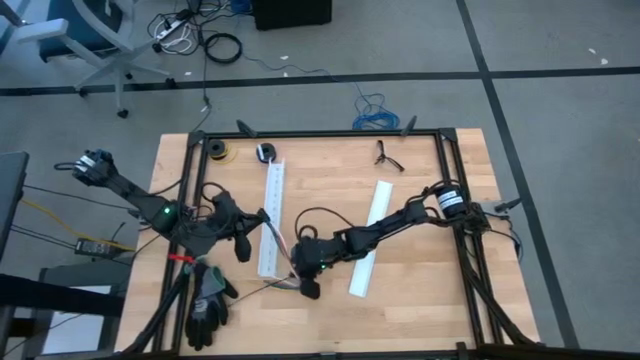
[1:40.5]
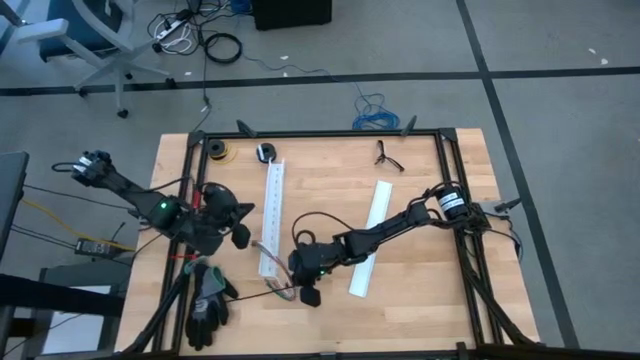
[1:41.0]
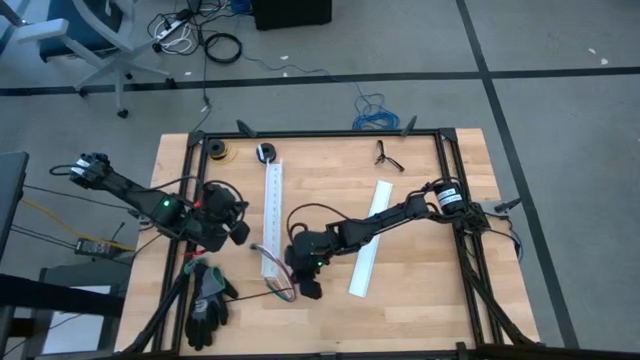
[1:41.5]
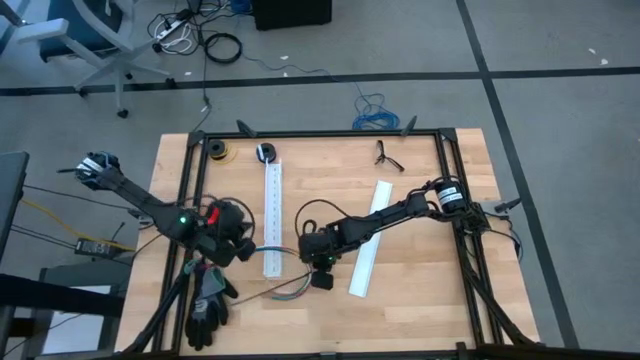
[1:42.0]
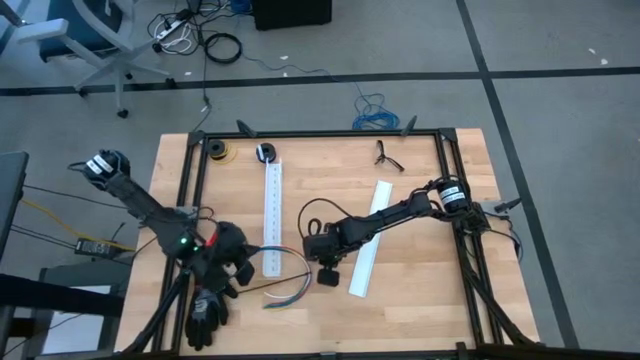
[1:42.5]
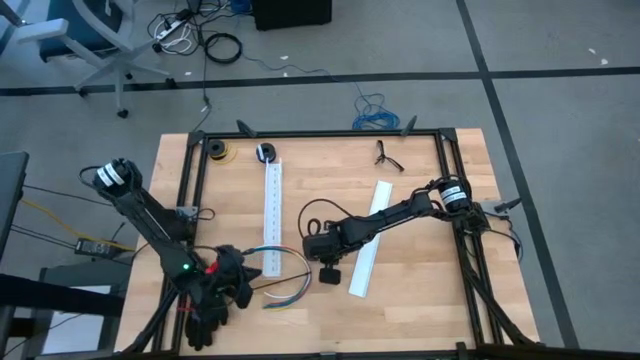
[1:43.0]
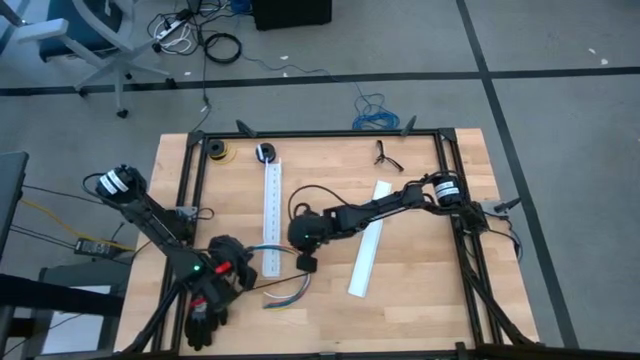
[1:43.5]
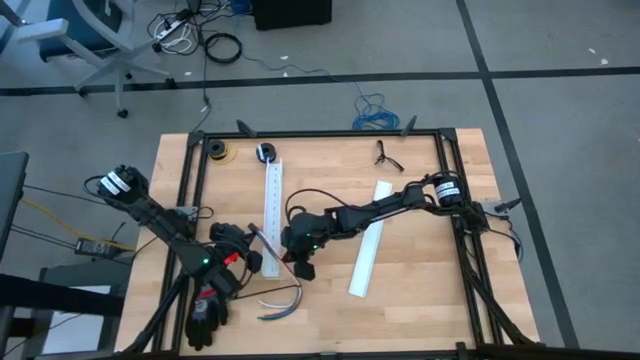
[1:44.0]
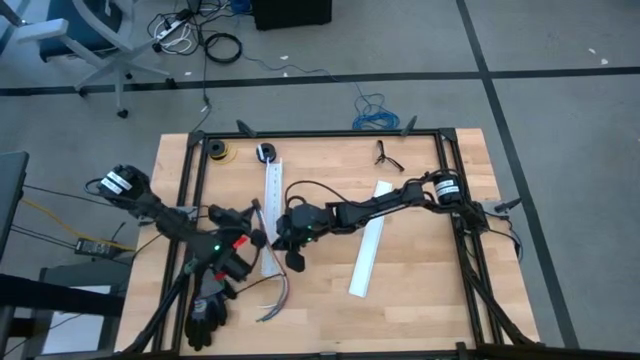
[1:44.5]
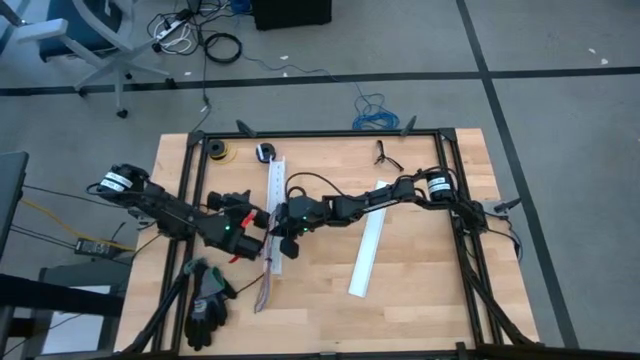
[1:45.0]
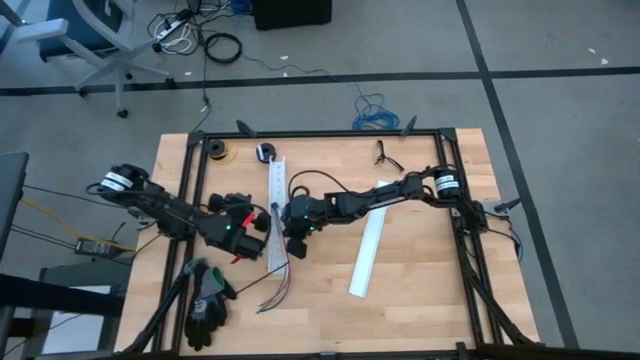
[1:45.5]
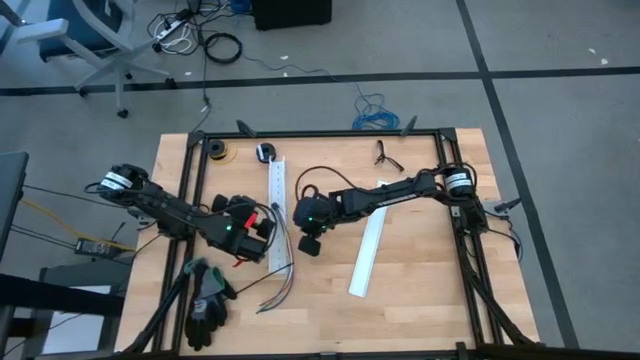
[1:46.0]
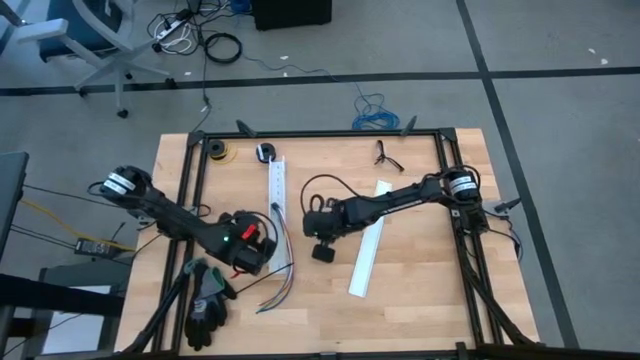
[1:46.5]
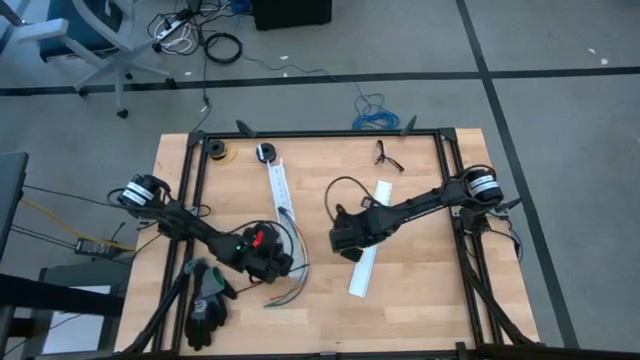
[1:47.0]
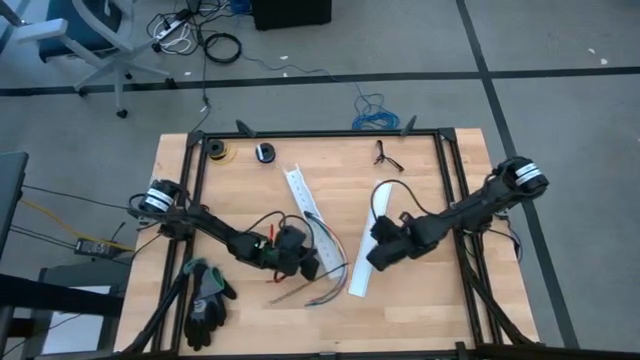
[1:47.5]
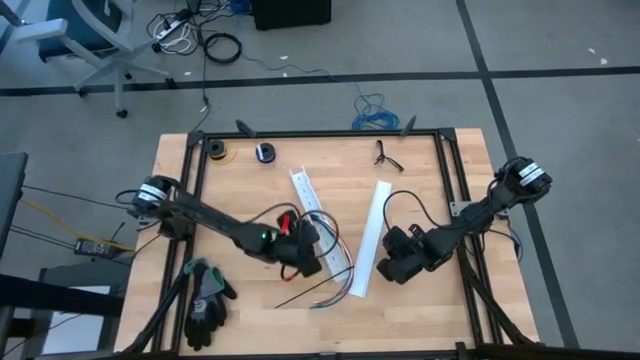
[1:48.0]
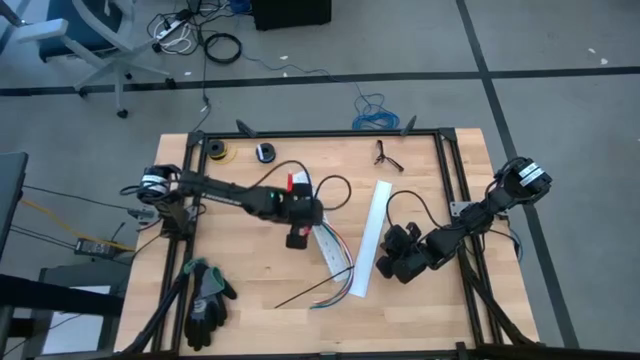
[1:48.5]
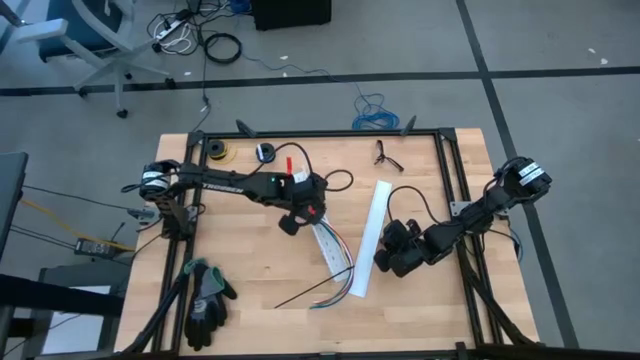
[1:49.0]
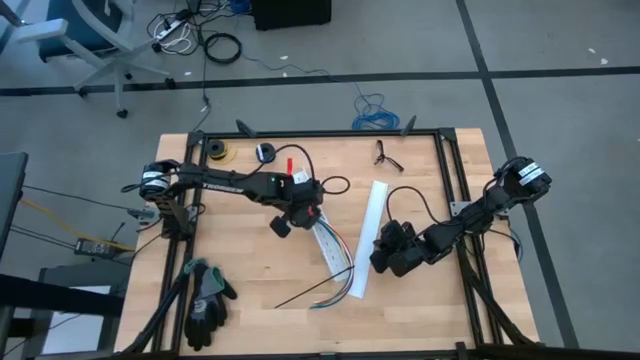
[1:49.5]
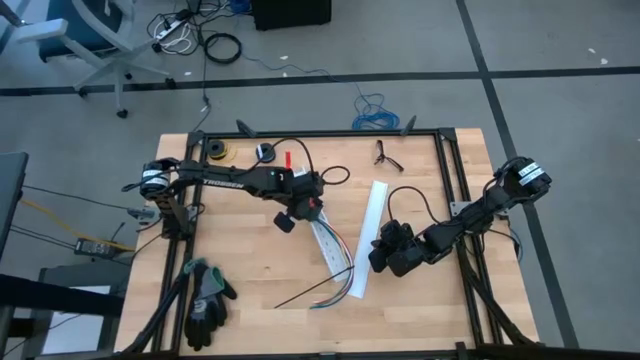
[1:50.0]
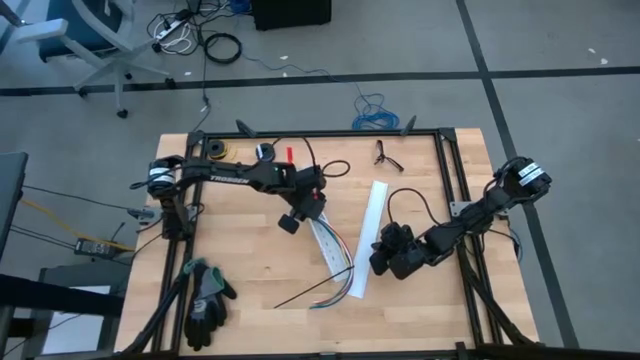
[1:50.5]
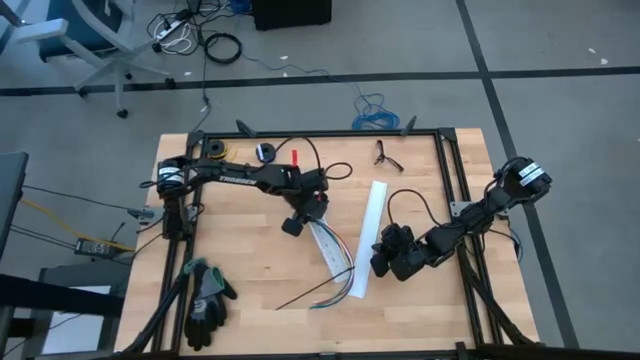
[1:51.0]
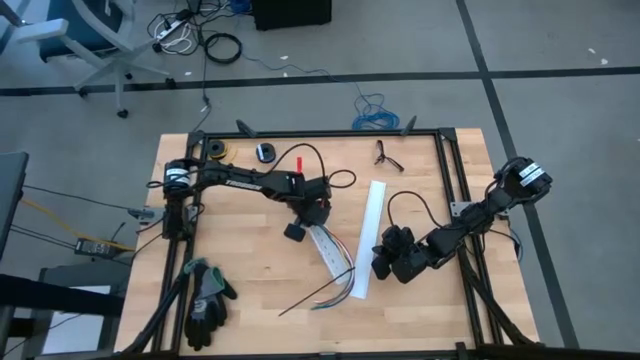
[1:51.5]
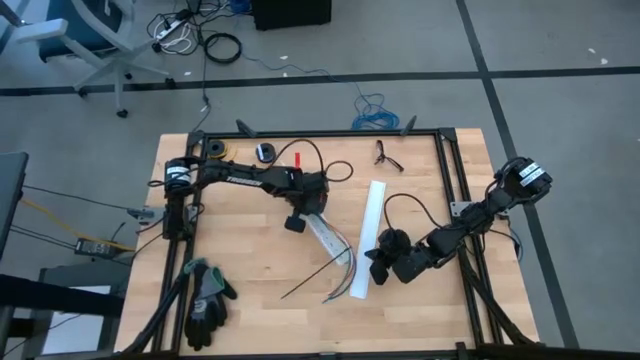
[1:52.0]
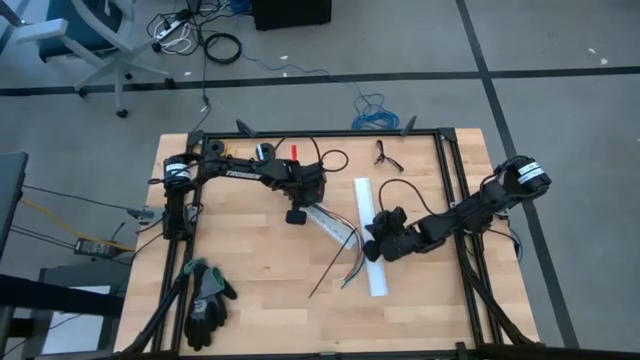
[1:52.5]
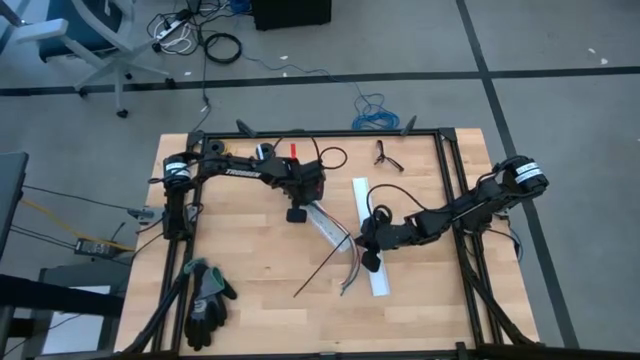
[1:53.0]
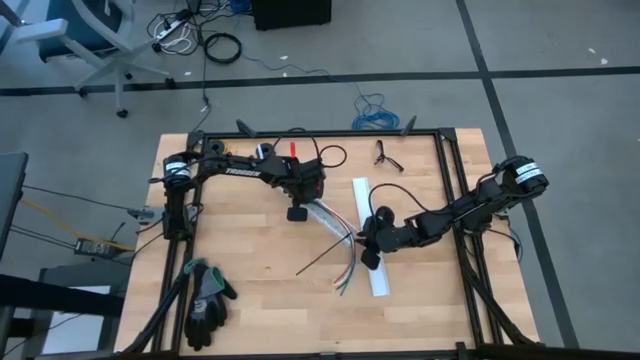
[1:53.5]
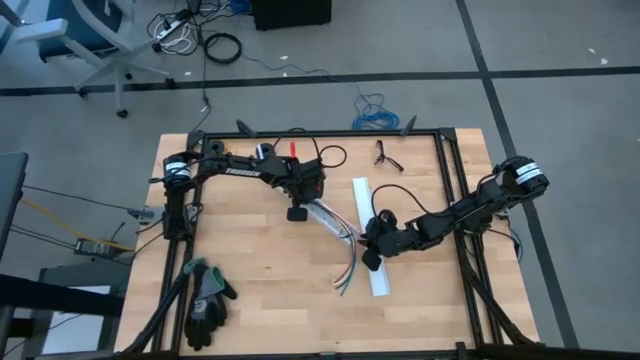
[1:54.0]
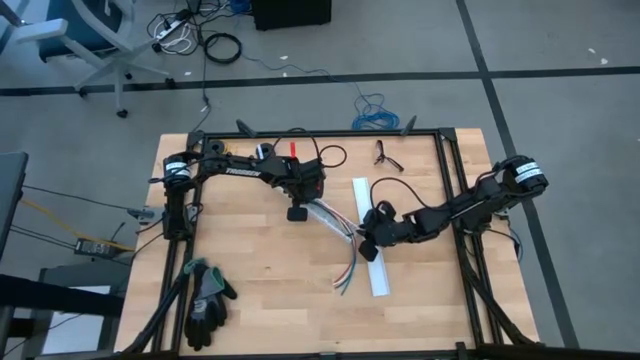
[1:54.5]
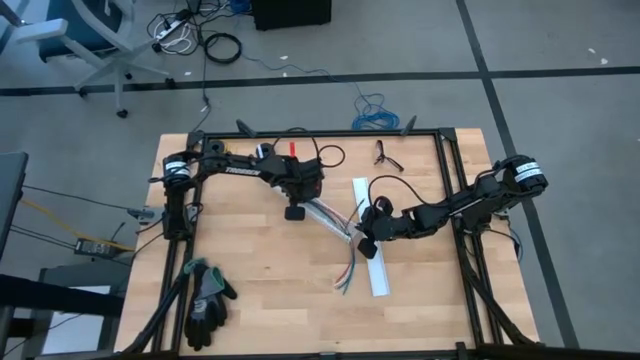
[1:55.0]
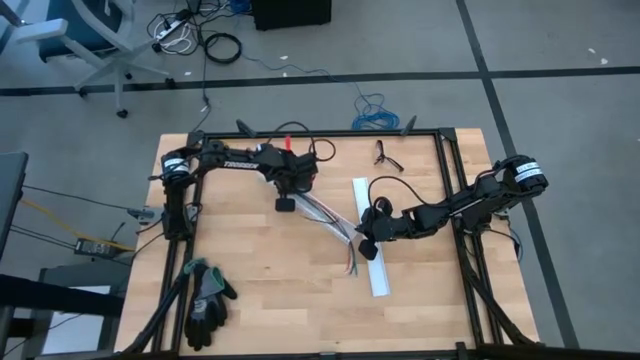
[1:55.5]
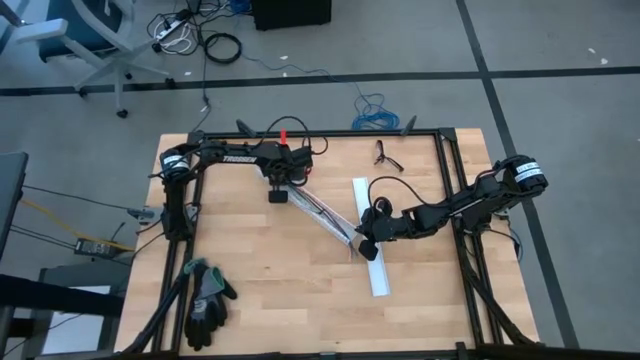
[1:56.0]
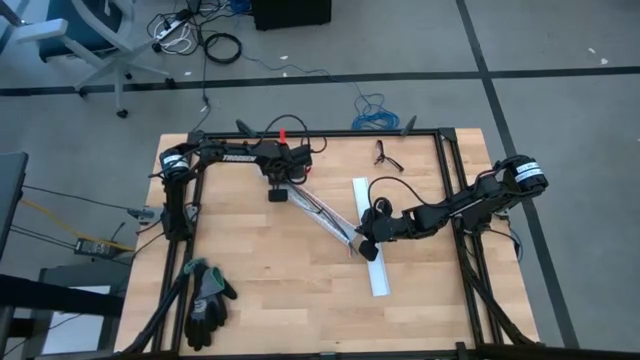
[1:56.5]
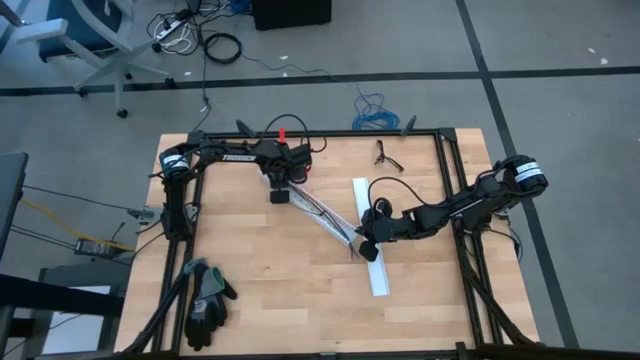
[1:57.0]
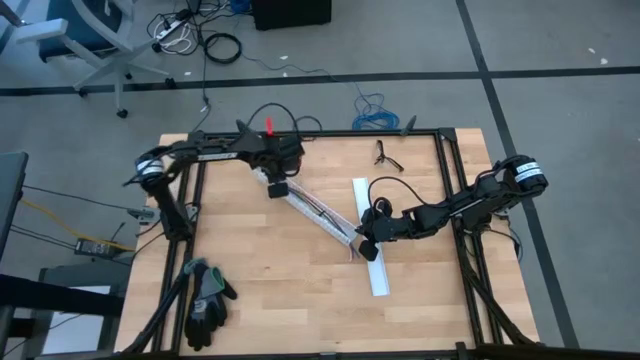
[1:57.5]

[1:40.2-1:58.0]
Task: Ziptie cables
Put the ziptied cables into the cable duct

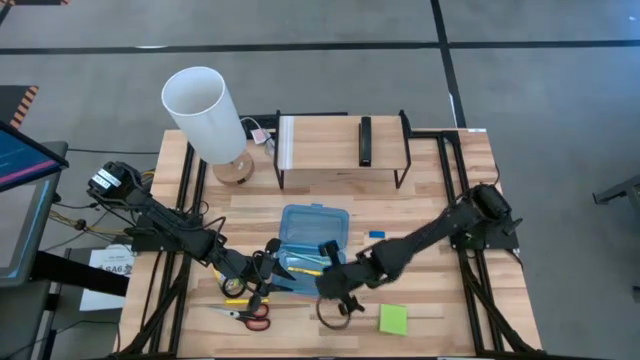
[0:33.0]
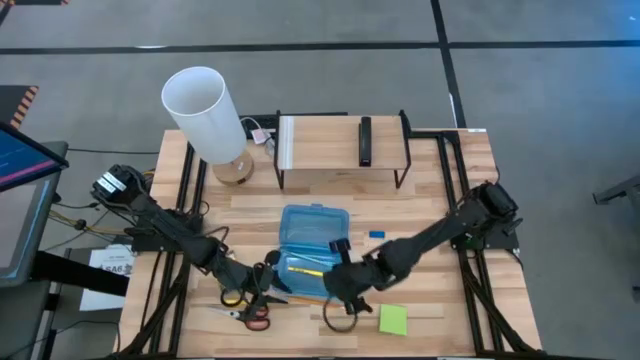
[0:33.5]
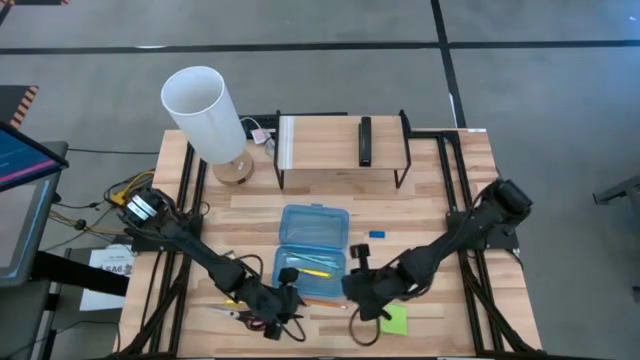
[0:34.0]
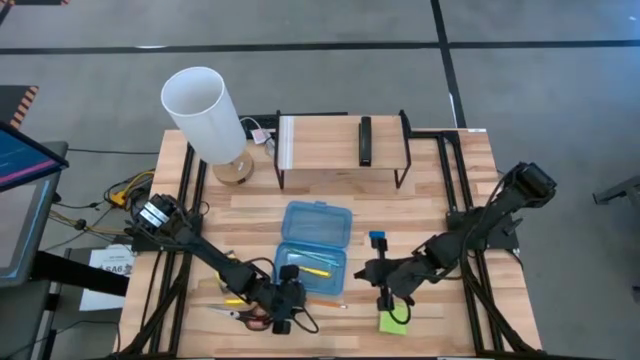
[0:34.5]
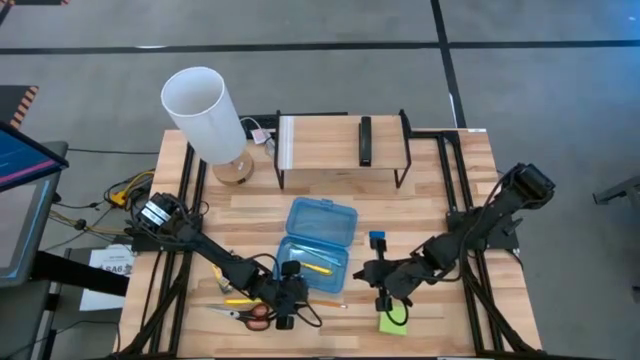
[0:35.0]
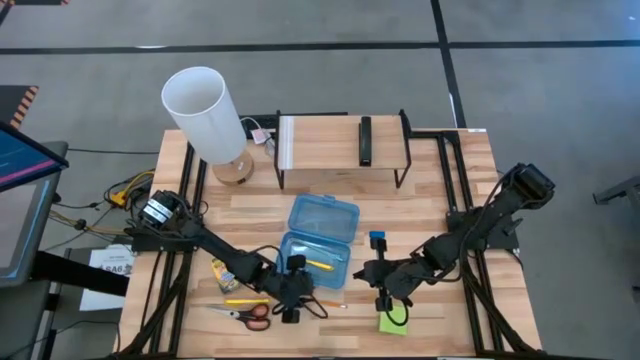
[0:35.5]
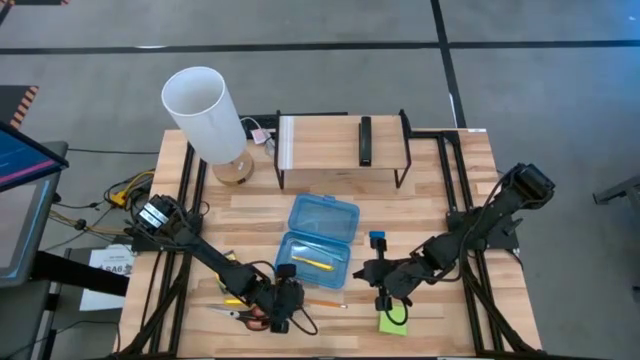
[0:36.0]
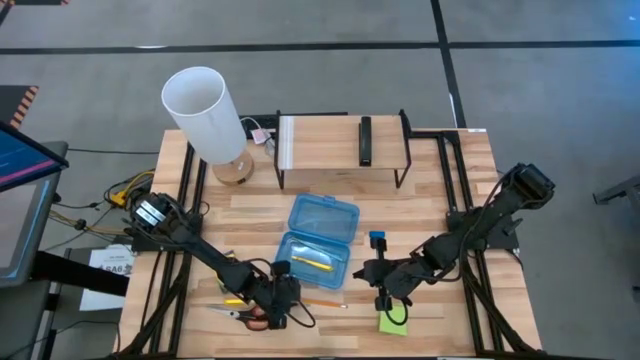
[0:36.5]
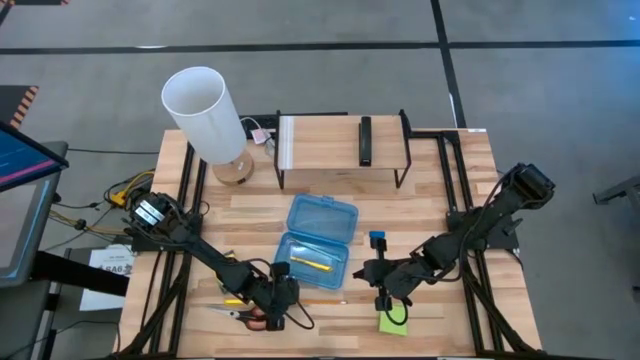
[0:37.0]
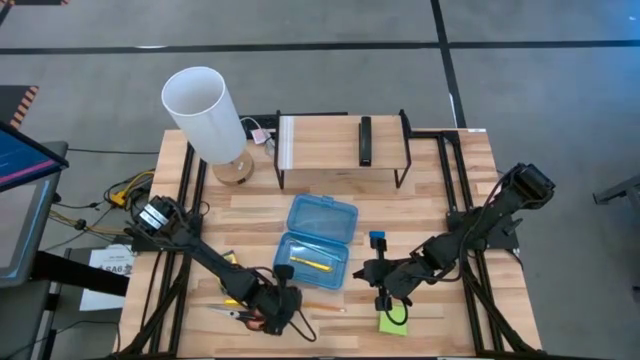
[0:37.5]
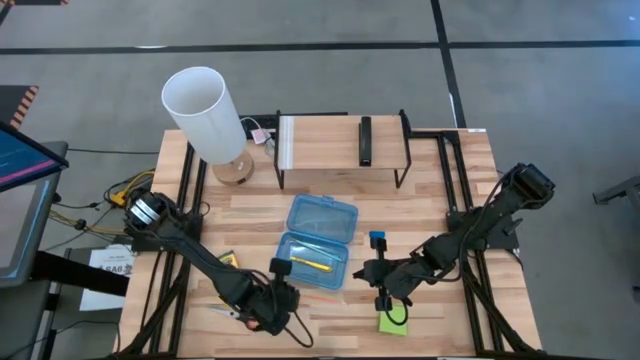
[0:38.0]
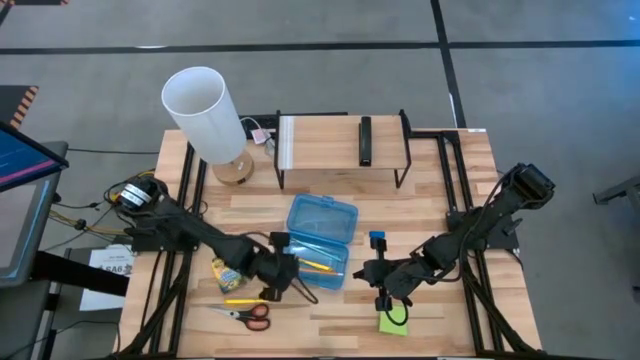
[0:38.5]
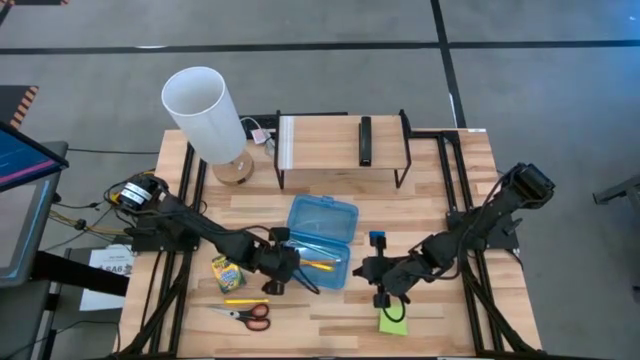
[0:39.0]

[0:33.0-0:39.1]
Task: Pack school essentials
Put the orange pencil into the blue supply box
